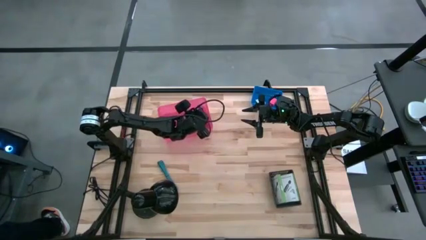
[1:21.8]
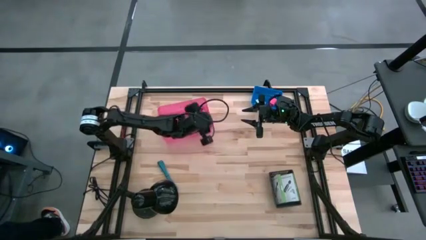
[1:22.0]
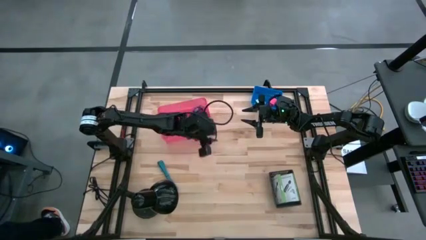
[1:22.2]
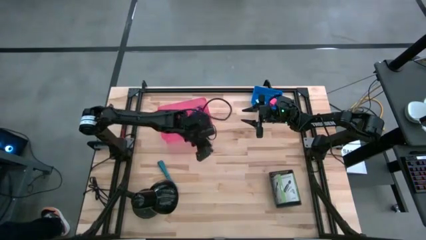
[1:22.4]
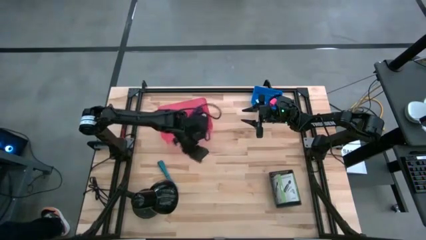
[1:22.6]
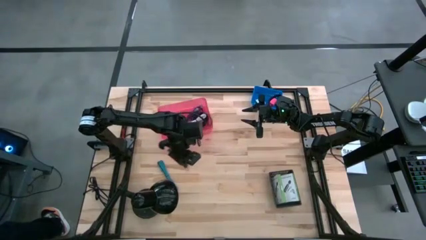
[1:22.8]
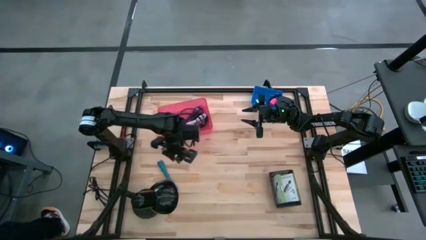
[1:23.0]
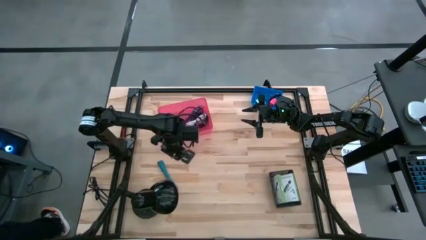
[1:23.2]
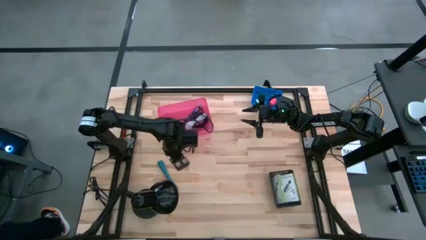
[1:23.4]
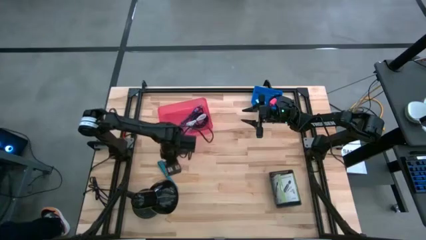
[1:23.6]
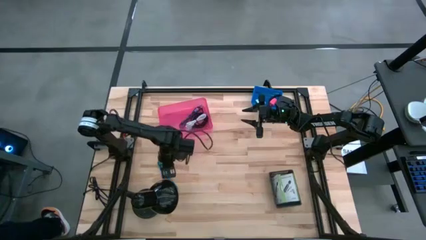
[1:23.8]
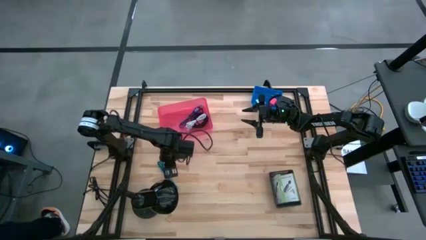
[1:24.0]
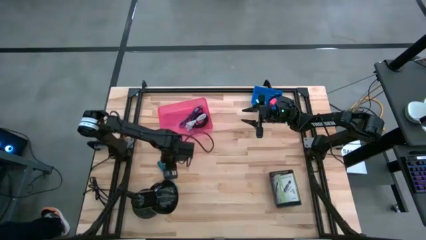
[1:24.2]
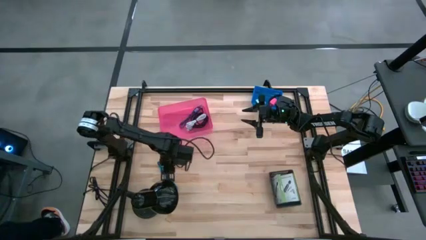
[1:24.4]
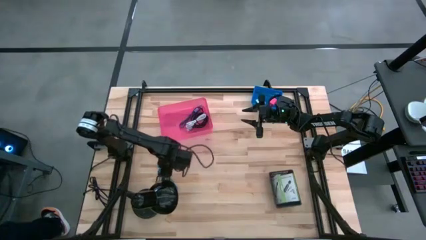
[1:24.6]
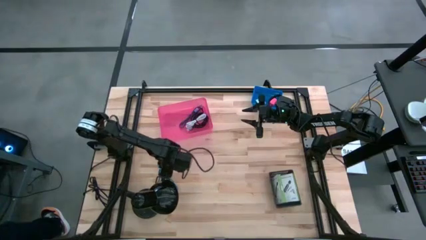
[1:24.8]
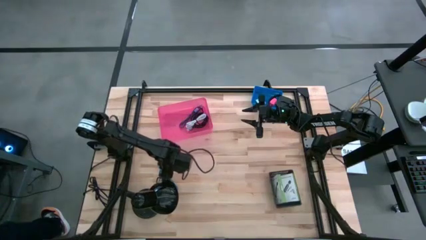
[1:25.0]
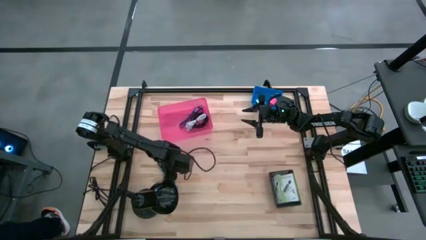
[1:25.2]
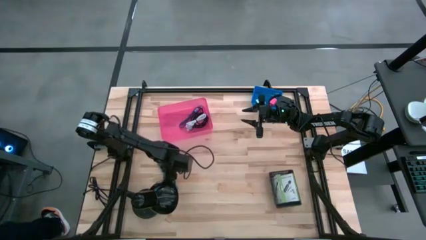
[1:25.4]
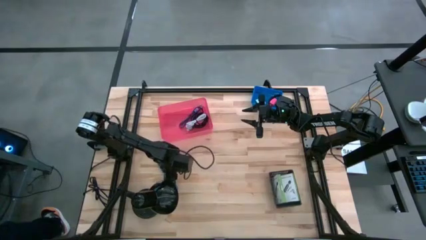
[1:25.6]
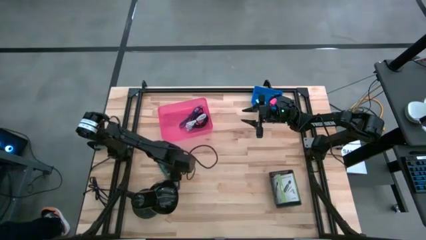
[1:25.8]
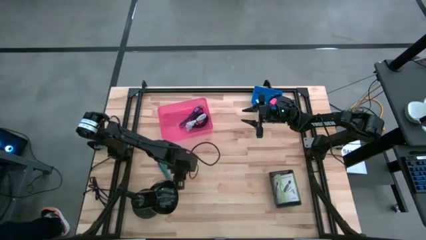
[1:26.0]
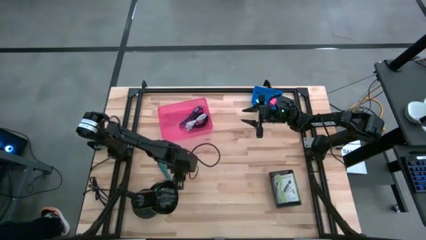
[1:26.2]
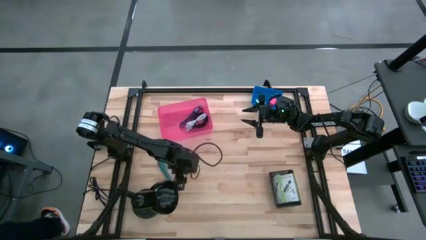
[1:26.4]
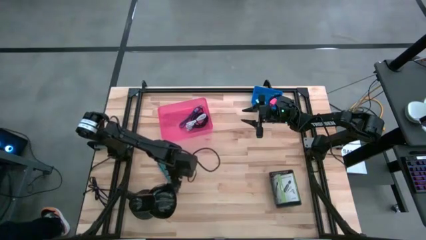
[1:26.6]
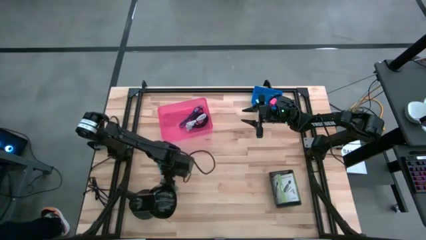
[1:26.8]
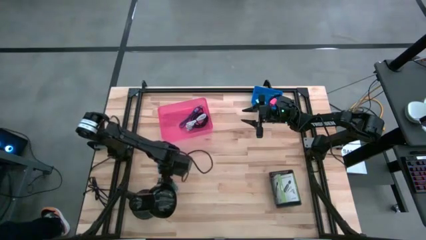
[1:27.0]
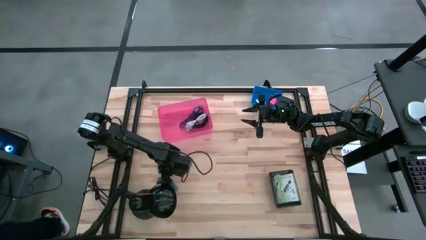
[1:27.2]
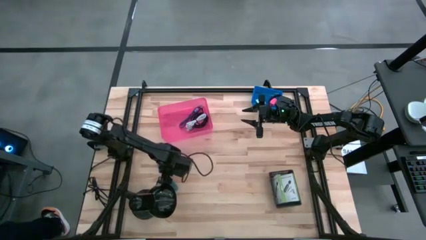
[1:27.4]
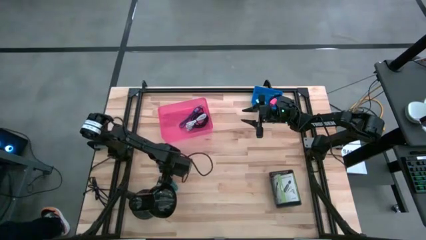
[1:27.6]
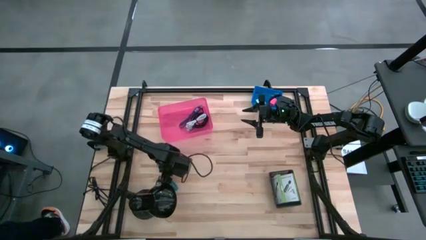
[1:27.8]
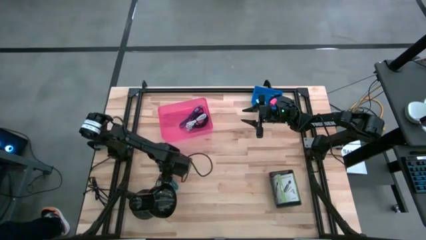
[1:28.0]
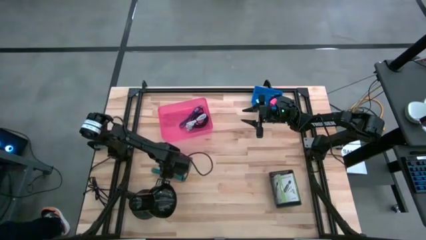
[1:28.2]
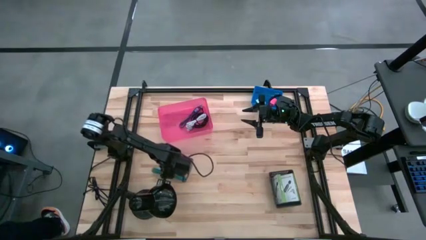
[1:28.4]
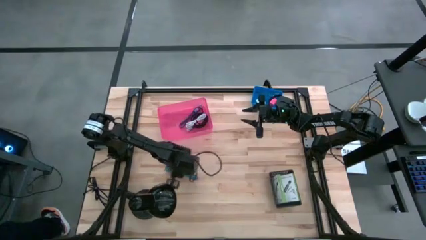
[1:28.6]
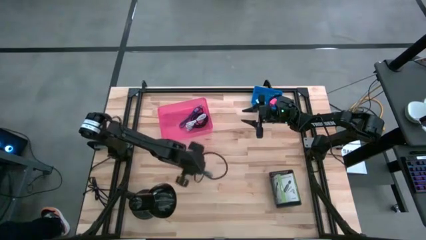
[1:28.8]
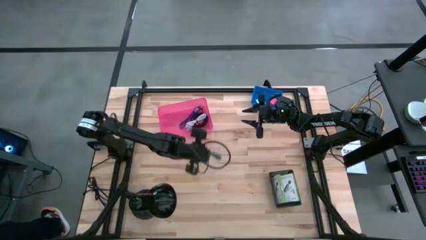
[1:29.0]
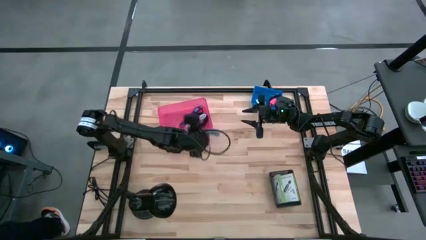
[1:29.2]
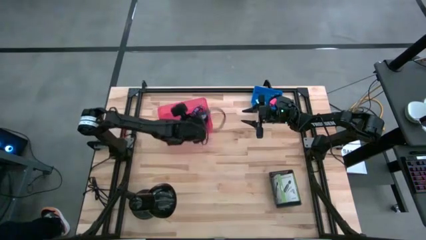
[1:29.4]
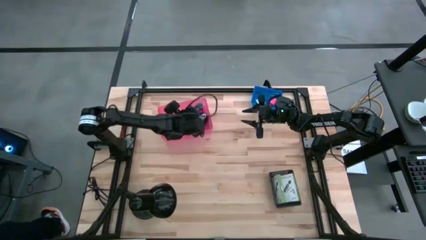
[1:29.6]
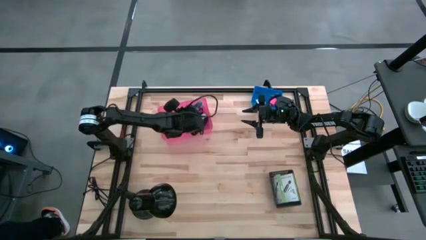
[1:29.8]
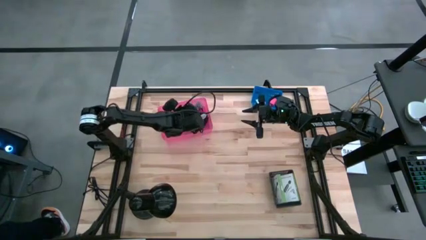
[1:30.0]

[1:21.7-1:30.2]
Task: Pick and place items into bin
Put the blue cable wire into the pink bin

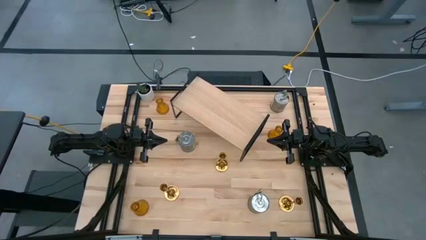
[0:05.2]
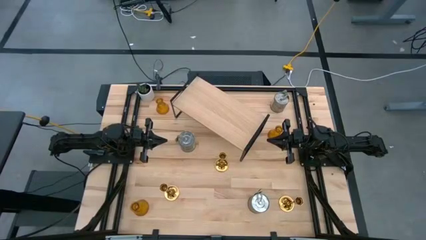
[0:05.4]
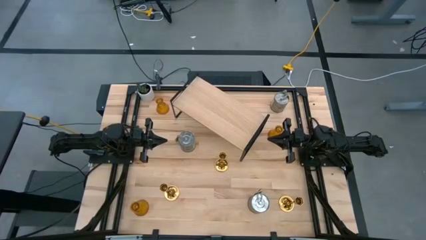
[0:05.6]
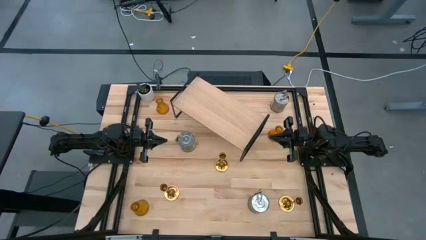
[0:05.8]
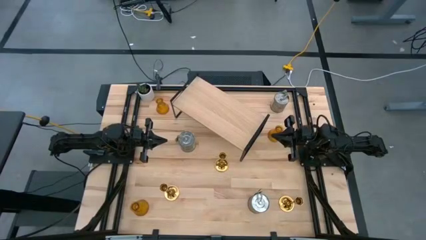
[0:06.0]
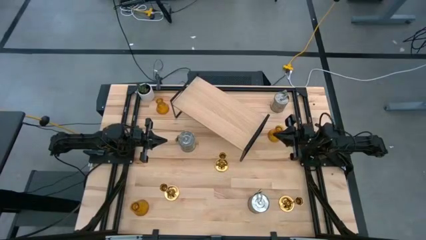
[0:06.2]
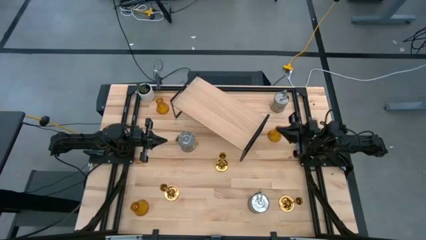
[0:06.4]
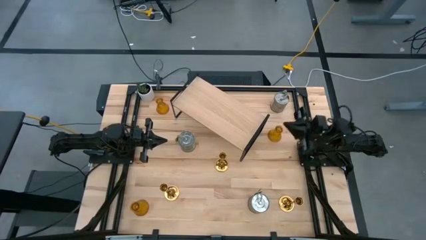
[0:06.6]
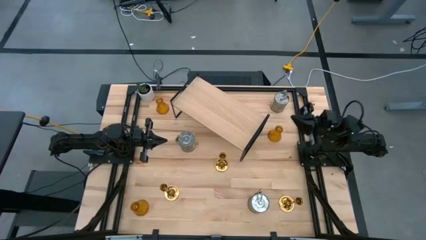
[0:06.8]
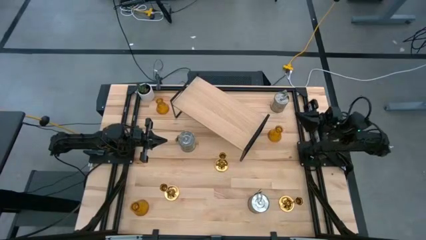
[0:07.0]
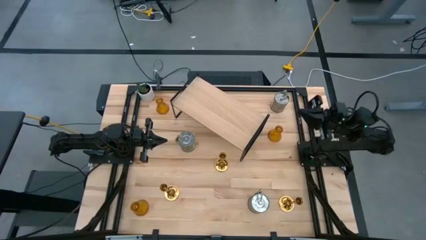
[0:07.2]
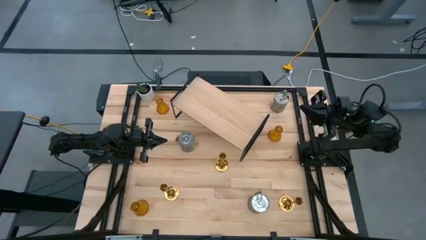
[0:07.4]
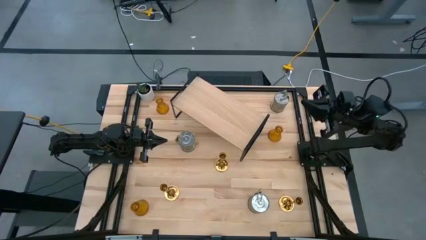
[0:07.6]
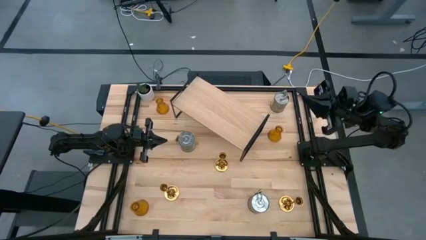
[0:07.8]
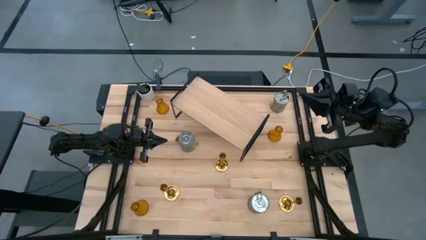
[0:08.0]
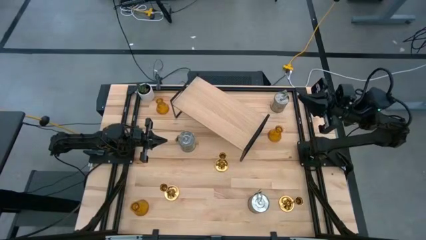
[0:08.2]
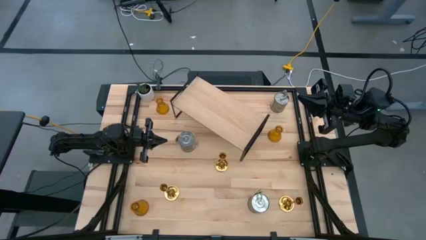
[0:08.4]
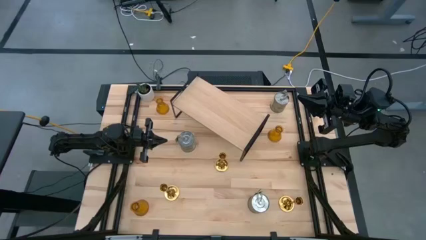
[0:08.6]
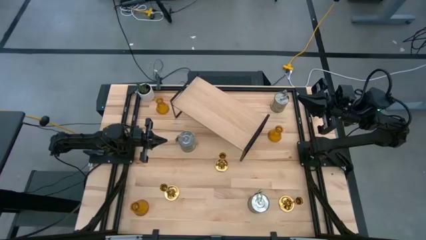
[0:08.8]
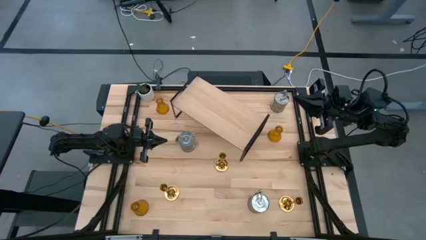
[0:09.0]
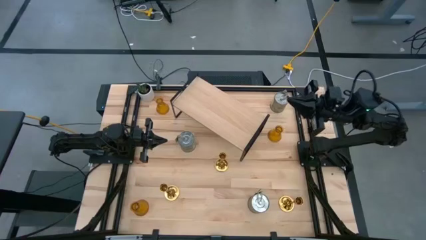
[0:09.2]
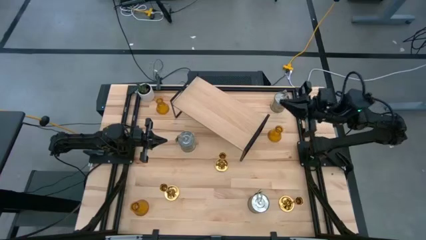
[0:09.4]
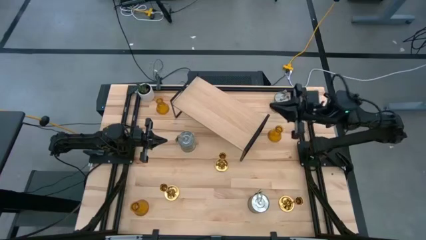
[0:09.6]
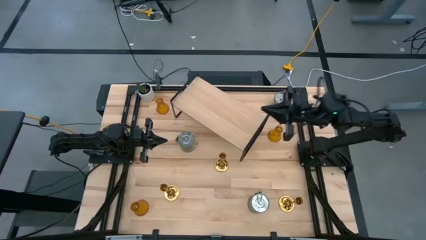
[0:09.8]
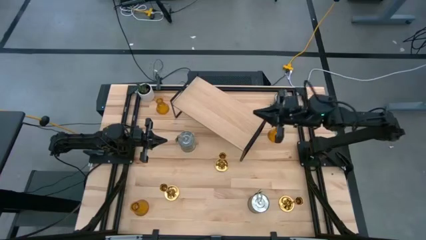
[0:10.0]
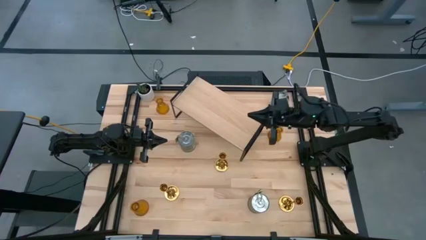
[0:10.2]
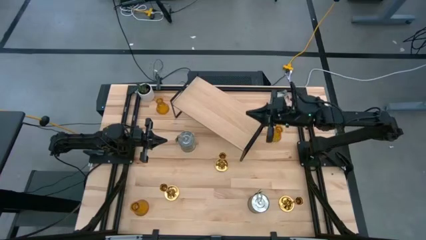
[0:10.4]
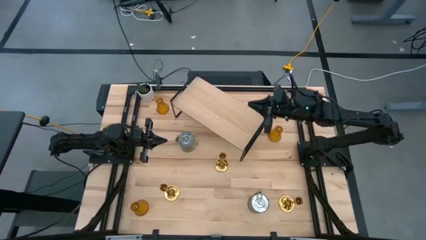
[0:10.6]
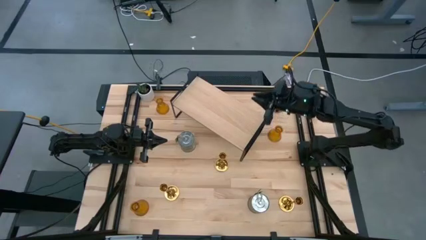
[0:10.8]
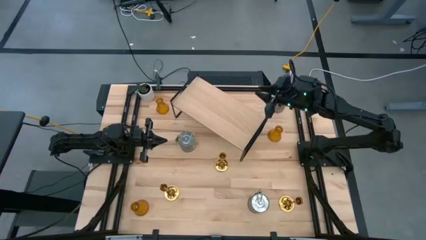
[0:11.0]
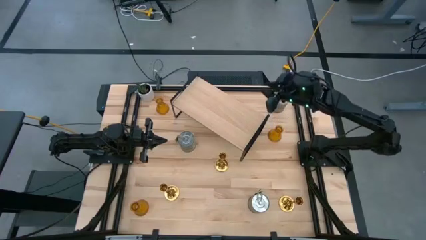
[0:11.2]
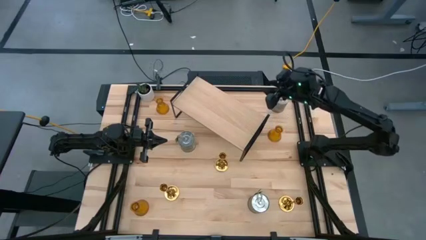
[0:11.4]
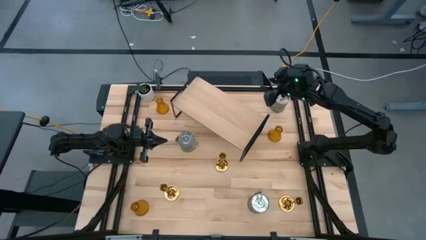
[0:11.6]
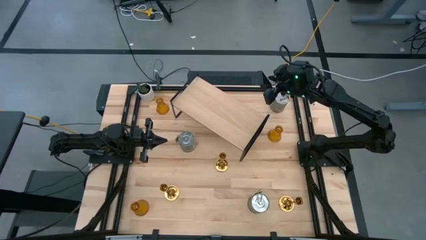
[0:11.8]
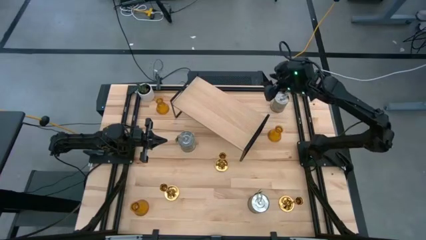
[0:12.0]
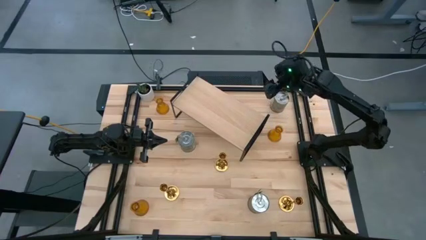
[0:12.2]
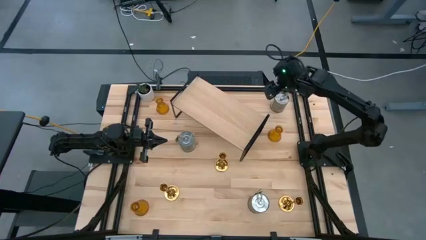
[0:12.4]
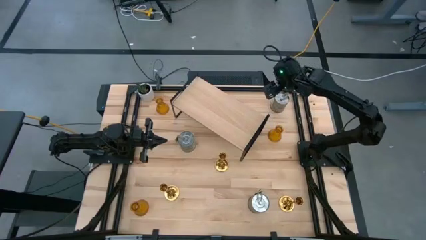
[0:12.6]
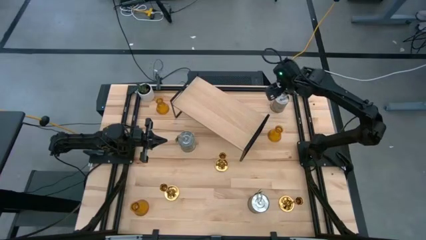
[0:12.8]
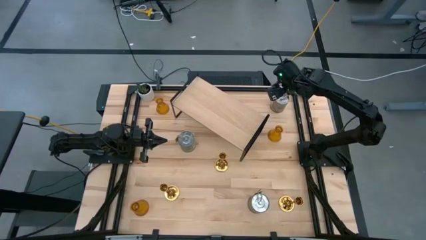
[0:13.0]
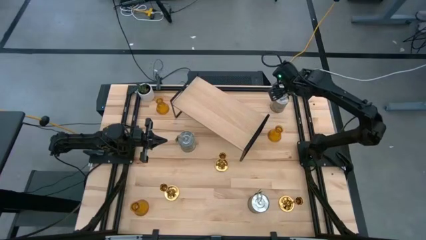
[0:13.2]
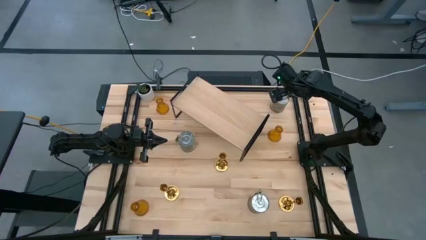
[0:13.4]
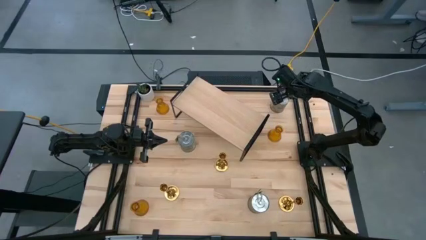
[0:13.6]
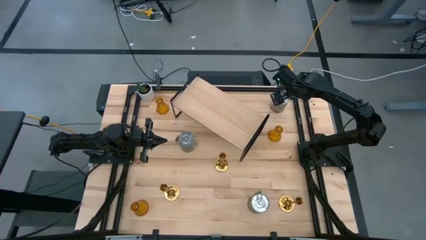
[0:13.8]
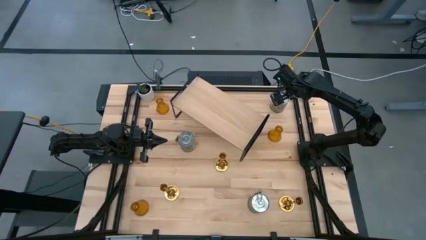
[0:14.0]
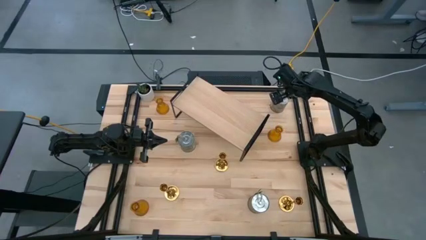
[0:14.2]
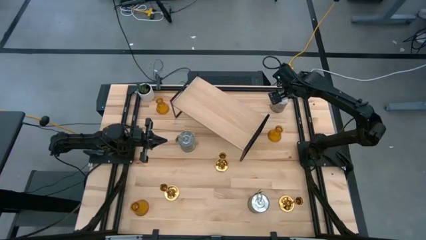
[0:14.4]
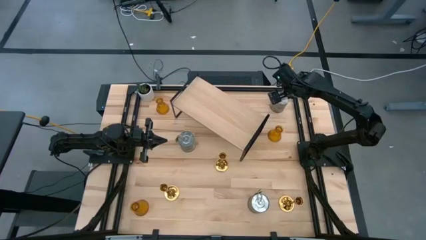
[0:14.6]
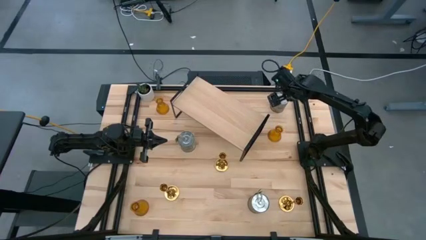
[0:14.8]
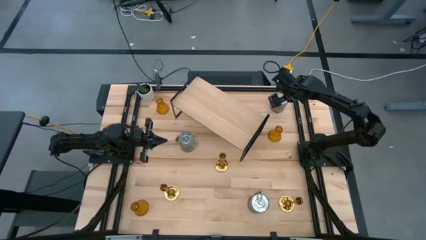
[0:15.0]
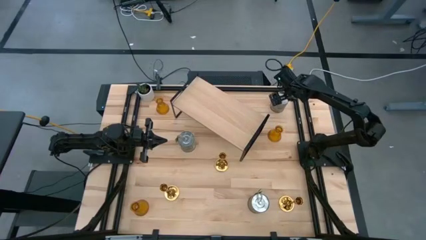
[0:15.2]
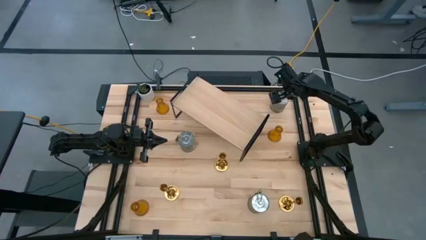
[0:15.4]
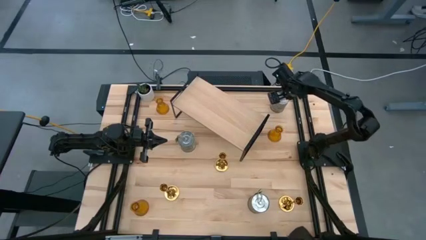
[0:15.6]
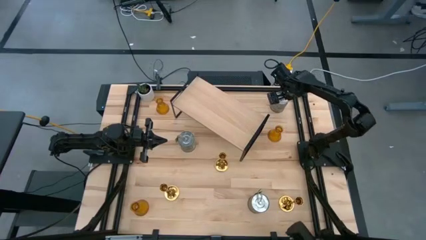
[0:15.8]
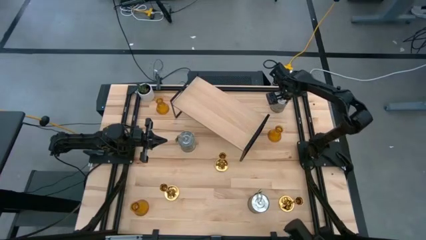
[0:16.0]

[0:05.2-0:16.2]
Task: Pick & Place candle stick holders
Put the top right scented candle on the shelf
